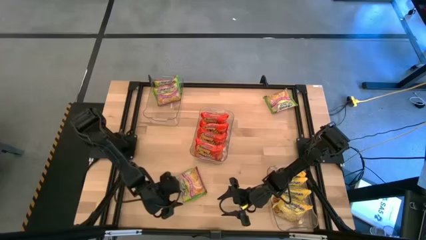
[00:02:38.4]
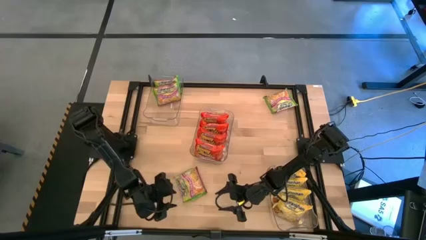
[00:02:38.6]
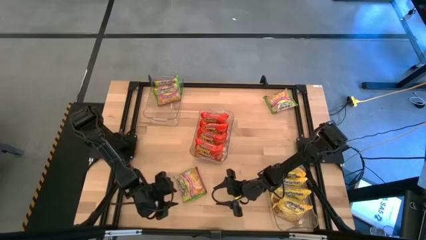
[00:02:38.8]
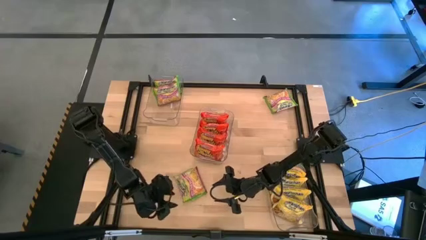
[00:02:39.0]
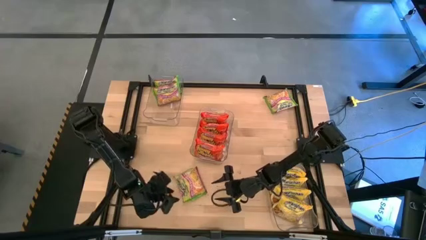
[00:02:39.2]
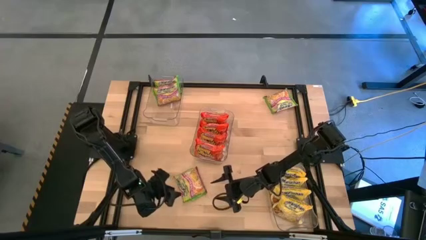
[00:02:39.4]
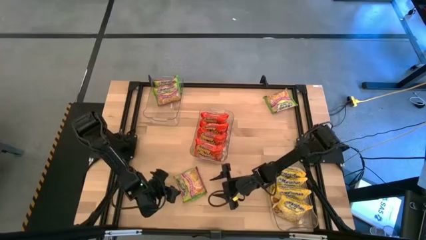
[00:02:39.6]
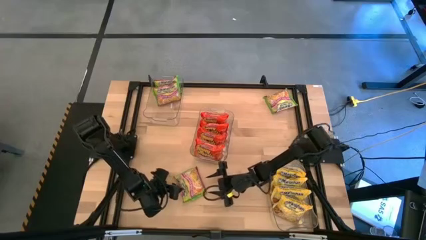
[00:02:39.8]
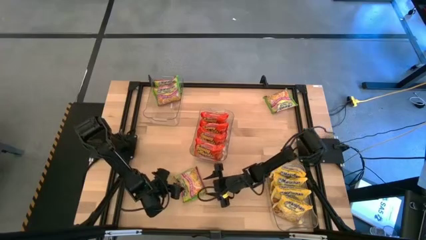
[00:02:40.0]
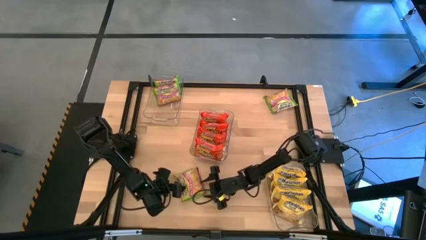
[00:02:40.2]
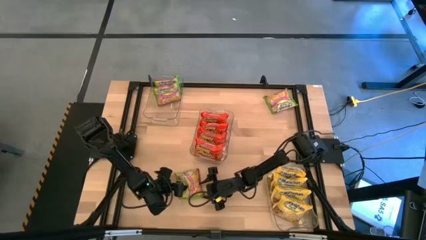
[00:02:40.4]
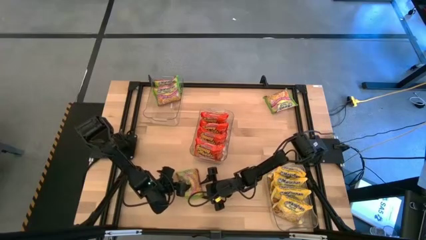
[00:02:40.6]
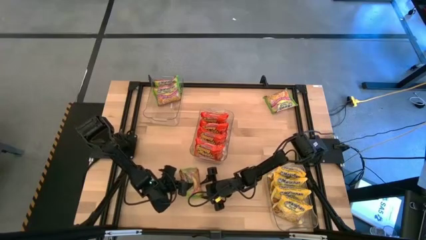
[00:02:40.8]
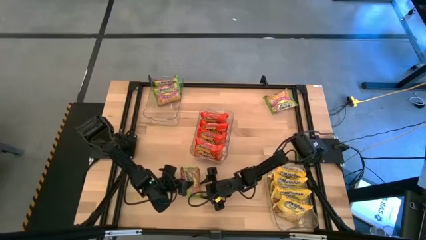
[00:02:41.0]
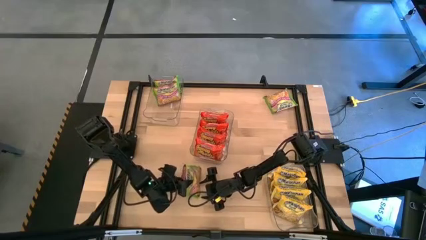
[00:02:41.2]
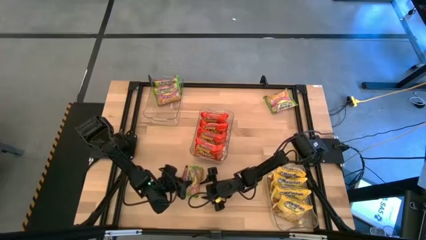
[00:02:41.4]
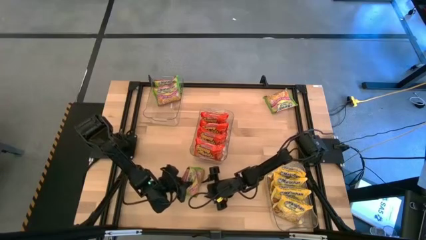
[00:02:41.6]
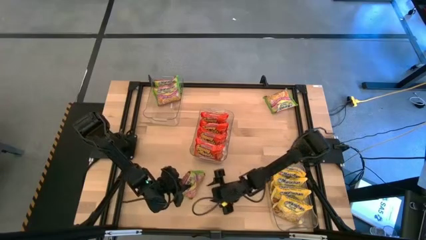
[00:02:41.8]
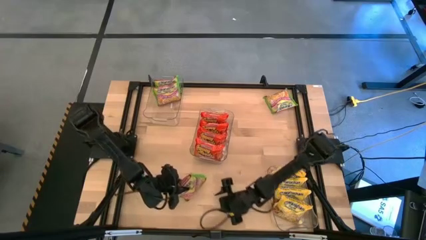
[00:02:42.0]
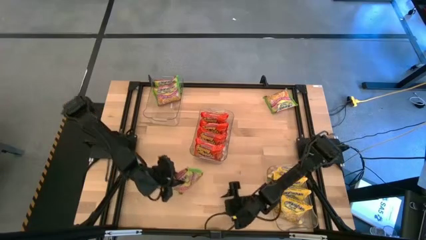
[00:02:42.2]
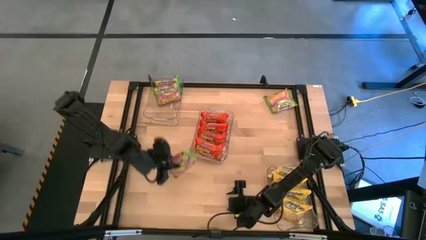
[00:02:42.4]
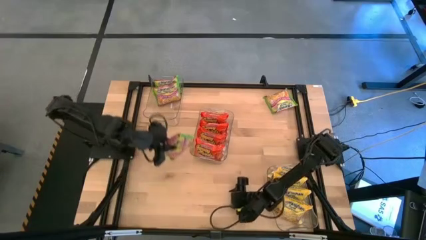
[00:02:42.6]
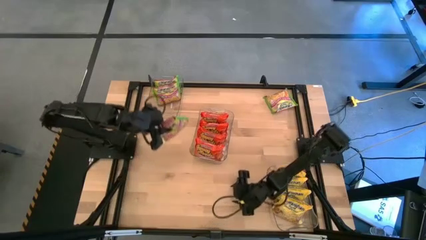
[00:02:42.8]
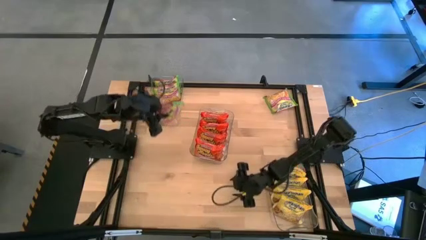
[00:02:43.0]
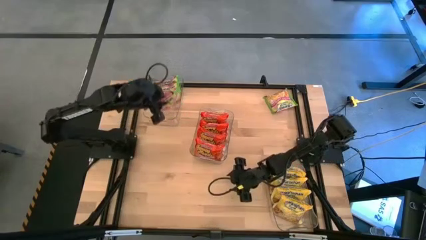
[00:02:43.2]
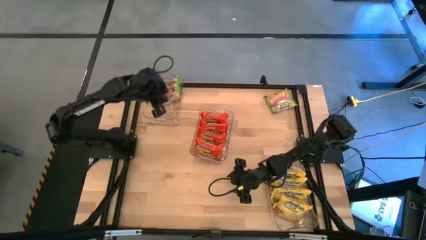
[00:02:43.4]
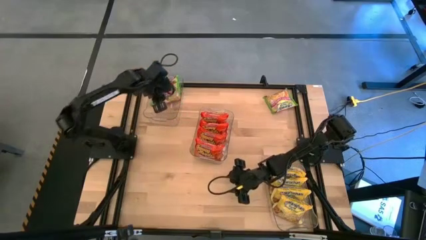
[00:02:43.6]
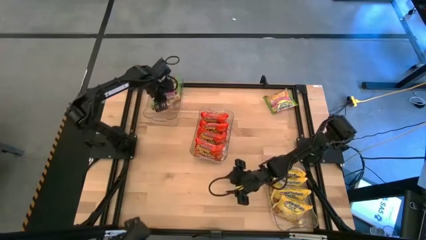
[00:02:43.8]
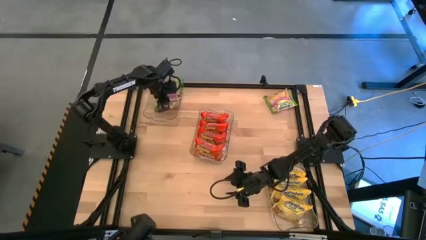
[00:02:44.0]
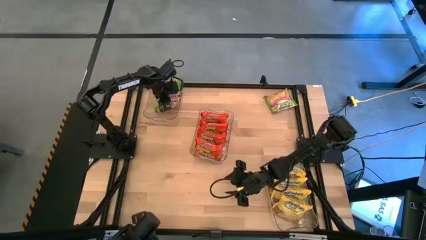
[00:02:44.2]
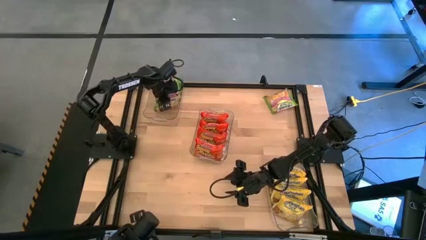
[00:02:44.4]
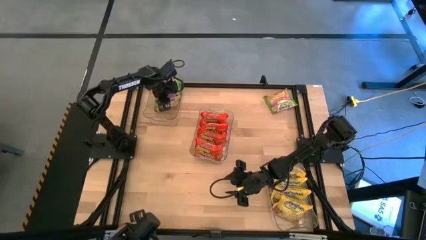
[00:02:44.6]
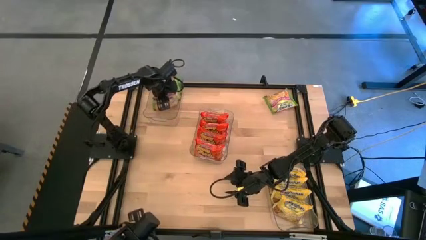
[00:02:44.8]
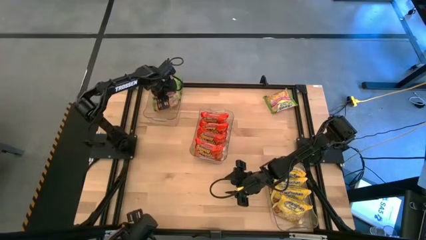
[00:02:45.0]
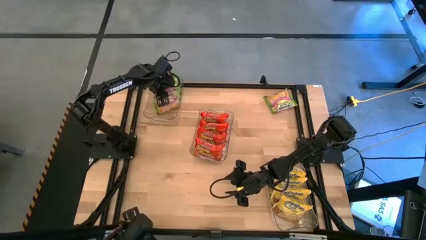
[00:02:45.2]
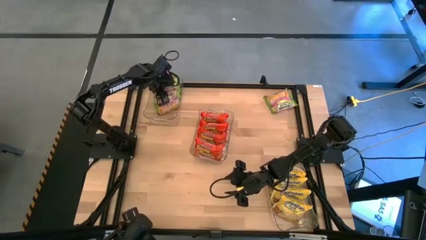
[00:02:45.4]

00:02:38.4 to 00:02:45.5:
Task: Sort Maruchan noodles
Put the bottom green noodle pack into the top transparent bin

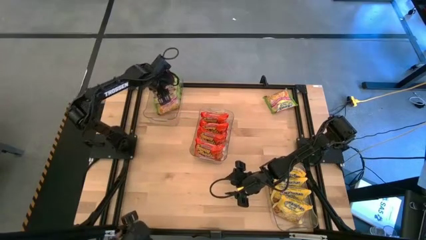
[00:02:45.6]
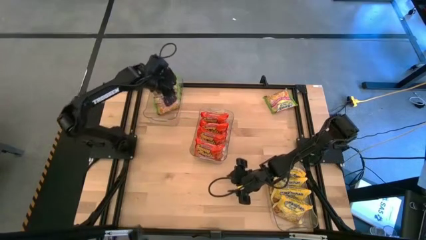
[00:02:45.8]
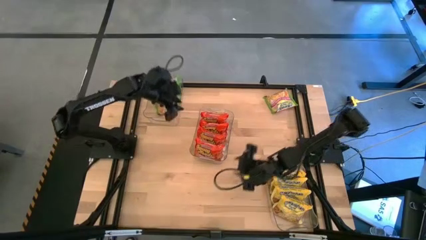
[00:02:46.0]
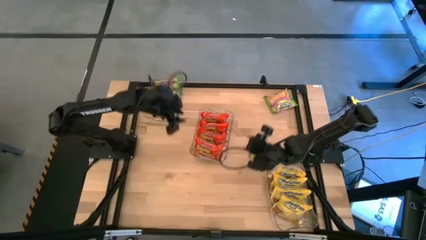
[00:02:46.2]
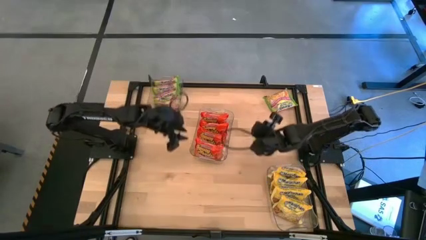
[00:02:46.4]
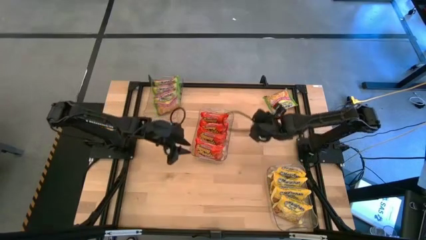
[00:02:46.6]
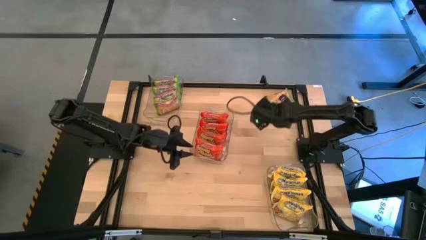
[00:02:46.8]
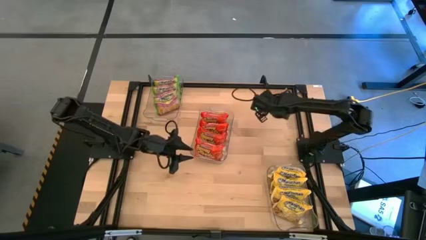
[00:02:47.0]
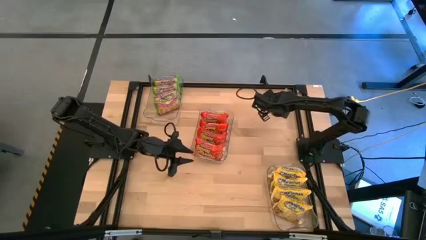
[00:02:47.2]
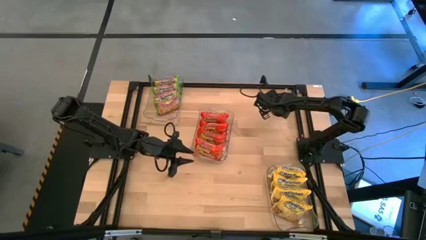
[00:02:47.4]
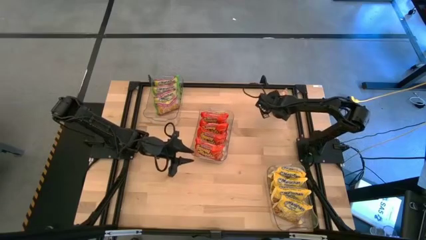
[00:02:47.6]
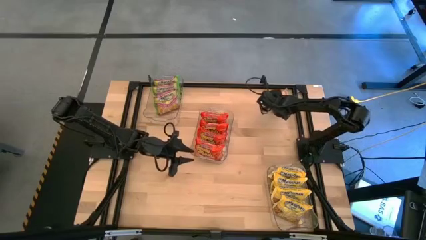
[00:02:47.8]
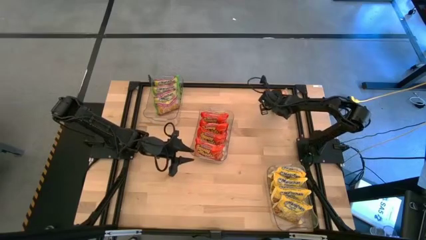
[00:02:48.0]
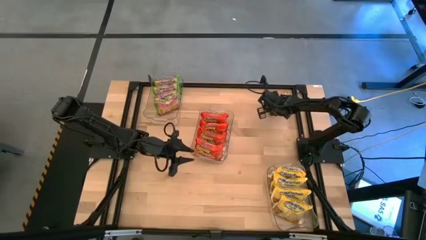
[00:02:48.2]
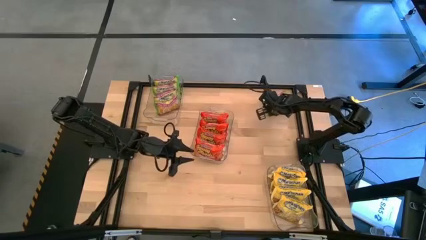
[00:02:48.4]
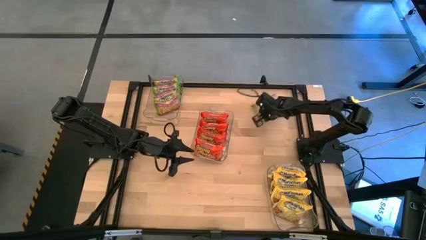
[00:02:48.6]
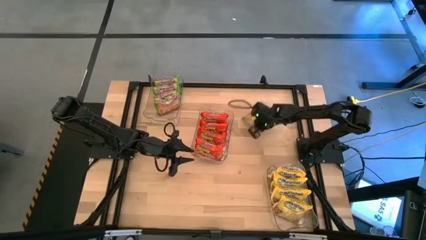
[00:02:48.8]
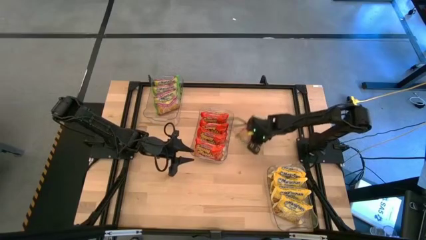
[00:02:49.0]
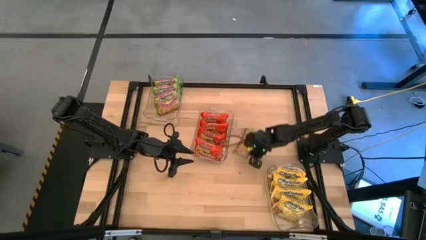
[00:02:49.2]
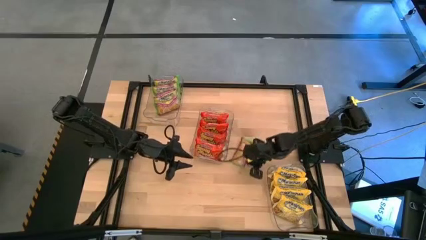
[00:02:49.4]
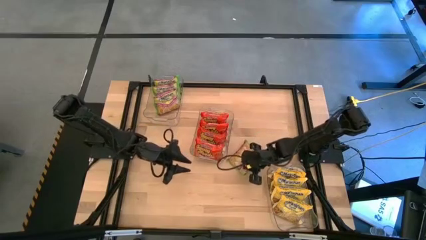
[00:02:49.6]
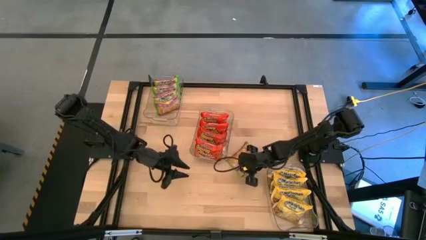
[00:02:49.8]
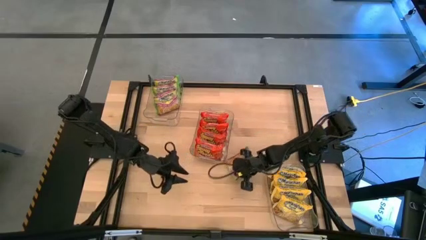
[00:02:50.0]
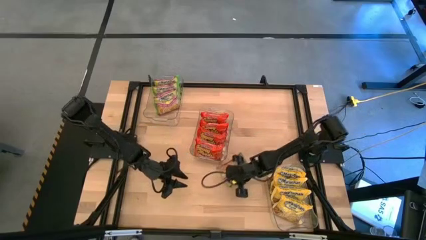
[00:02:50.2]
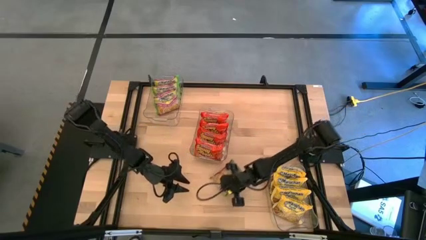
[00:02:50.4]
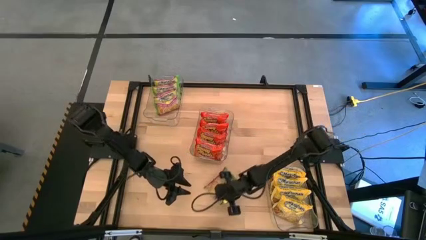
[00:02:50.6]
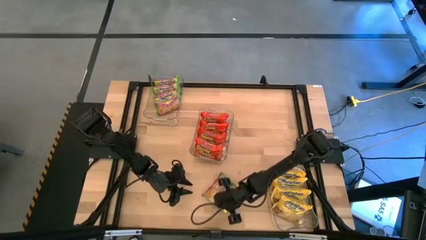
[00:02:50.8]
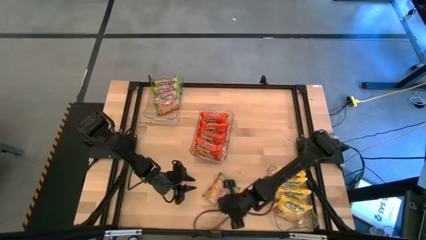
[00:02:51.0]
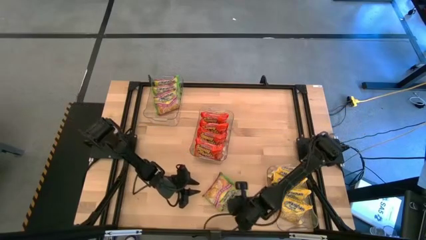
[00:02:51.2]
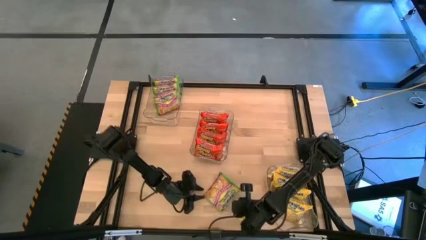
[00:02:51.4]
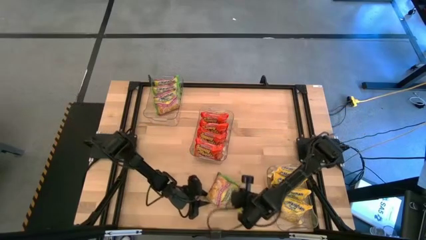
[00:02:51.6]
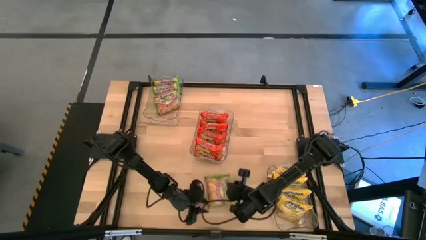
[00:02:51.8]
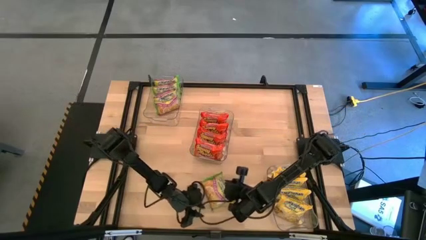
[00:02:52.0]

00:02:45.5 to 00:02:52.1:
Move the green noodle pack on the table

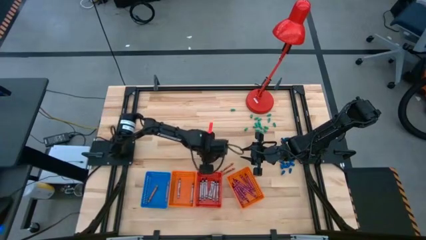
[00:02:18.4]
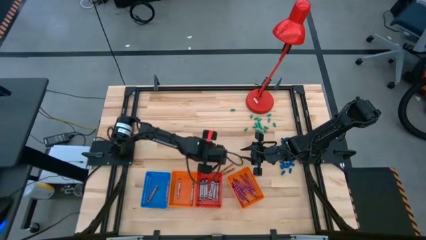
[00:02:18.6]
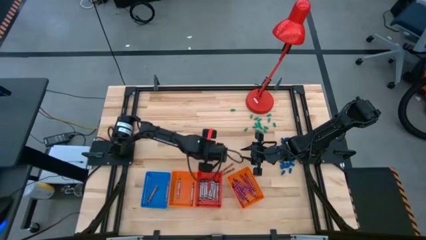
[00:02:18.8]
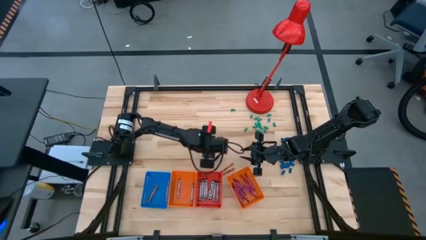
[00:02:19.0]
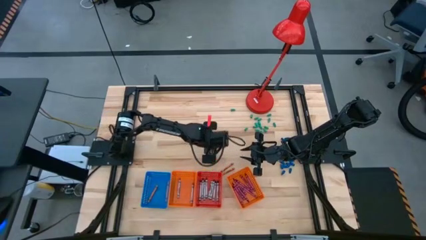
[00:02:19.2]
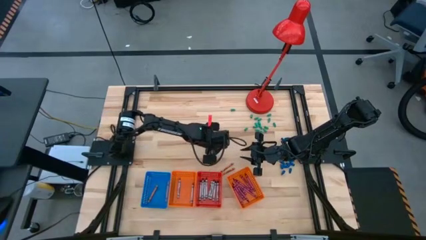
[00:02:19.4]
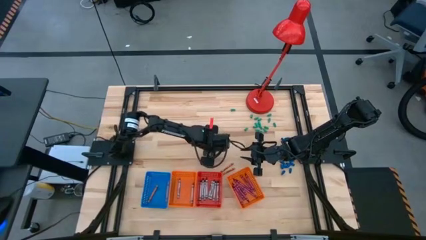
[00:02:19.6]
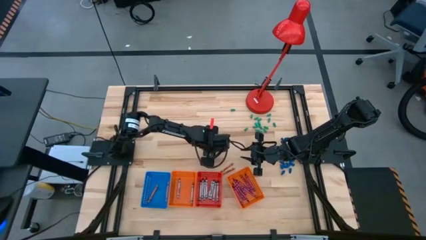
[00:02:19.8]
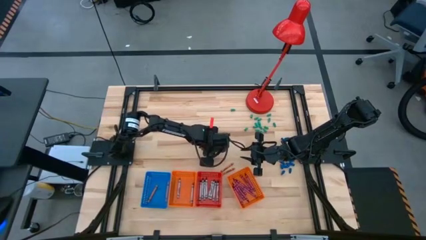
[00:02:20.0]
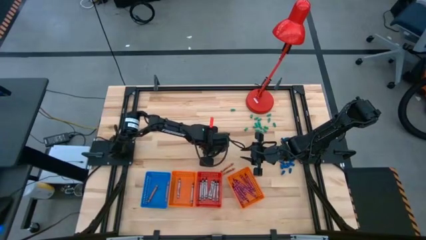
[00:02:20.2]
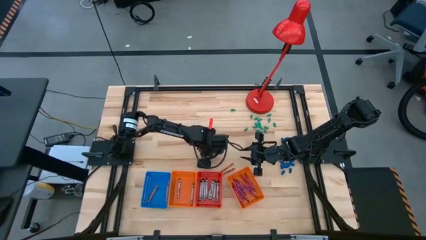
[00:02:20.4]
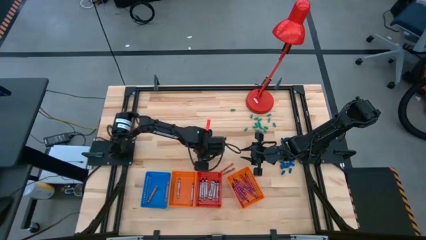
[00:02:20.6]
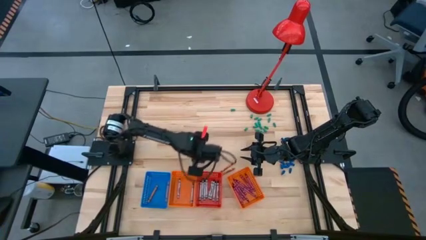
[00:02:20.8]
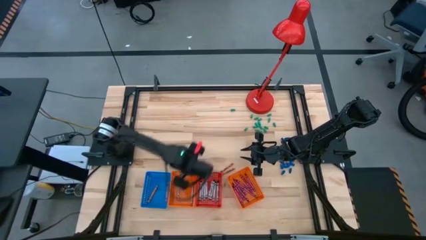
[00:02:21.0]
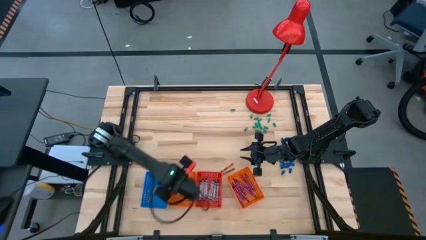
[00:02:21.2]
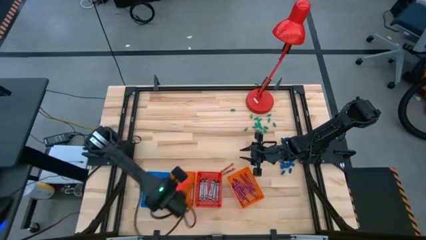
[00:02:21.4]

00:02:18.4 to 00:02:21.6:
Task: Sort crayons
Put the orange crayon into the blue bin
